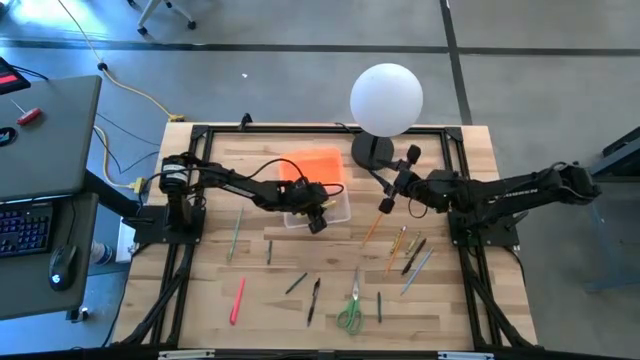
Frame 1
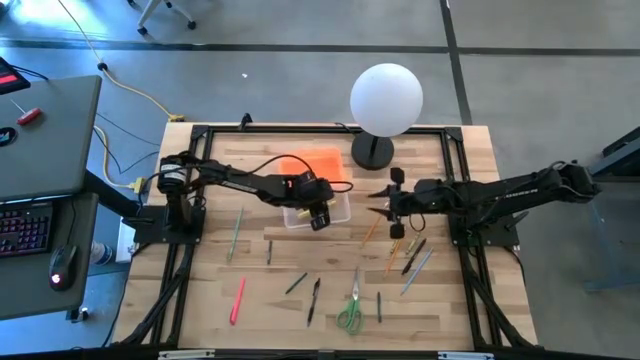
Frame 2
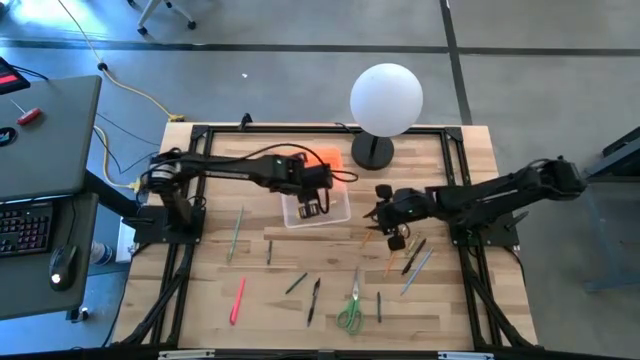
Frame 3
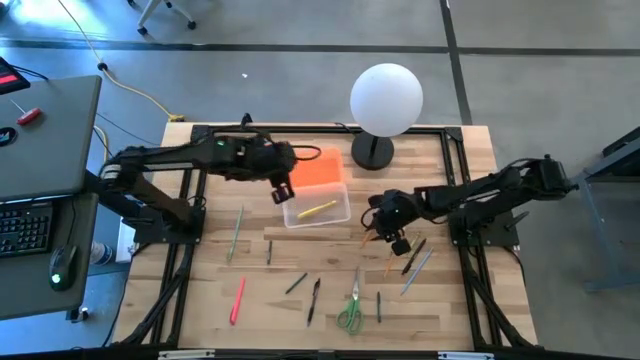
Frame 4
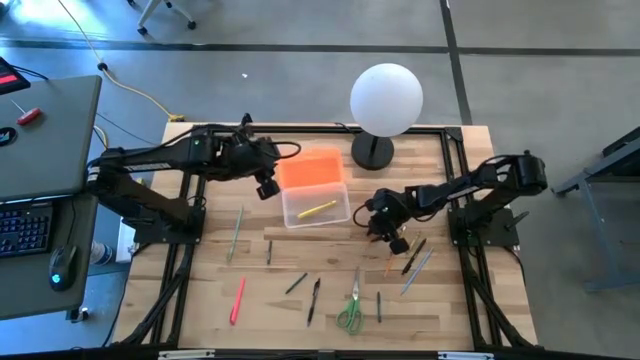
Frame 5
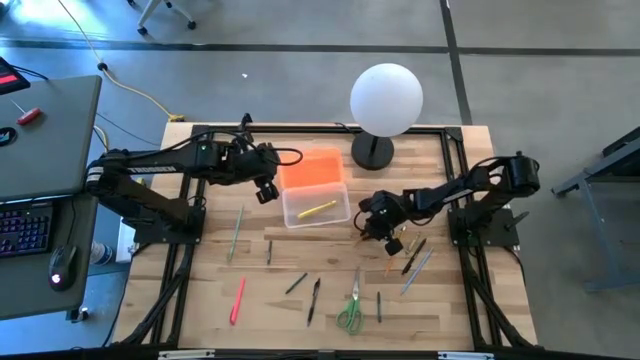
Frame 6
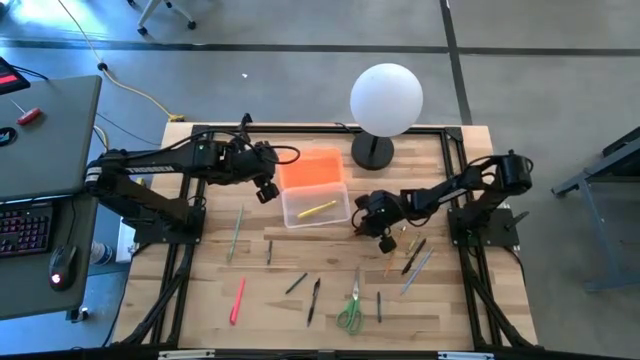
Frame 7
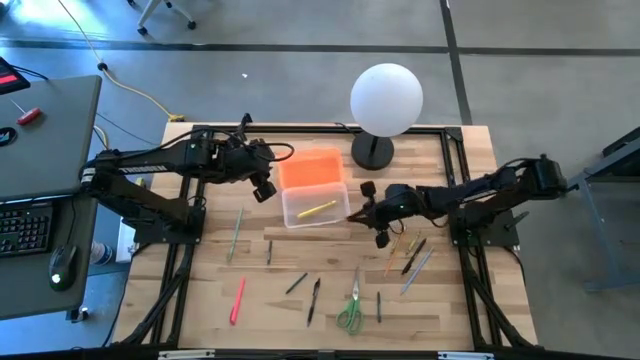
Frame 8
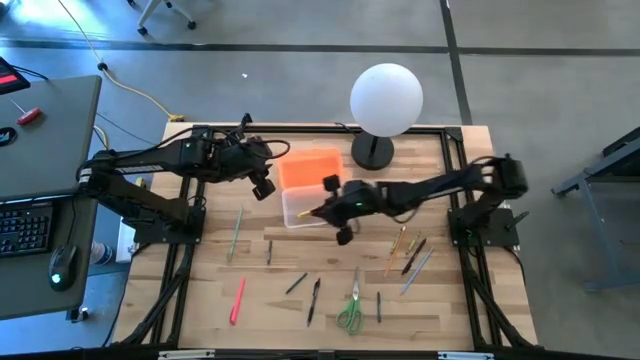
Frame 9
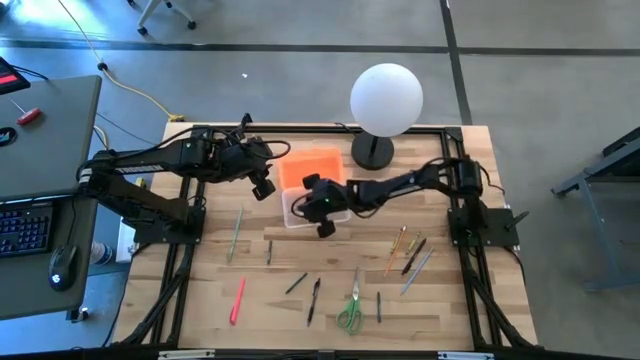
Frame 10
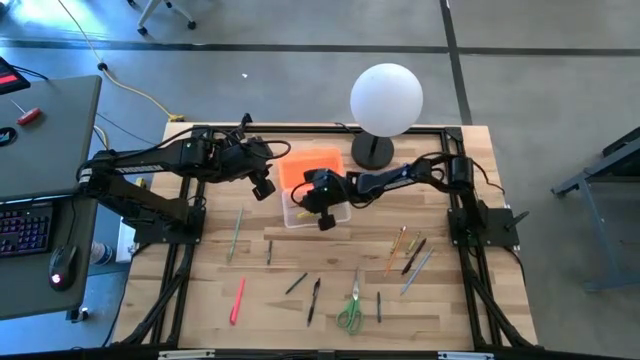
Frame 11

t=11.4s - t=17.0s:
Task: Pick & place school supplies into a supply box
Put the top orange pencil into the transparent supply box

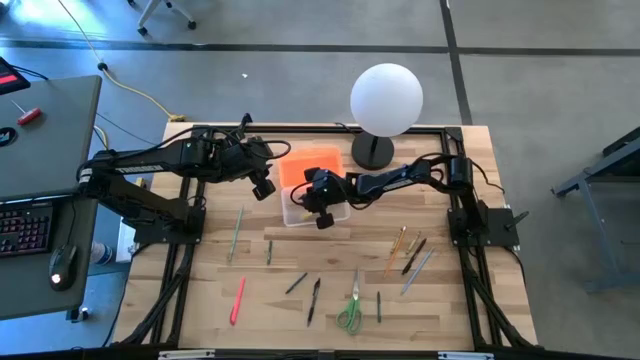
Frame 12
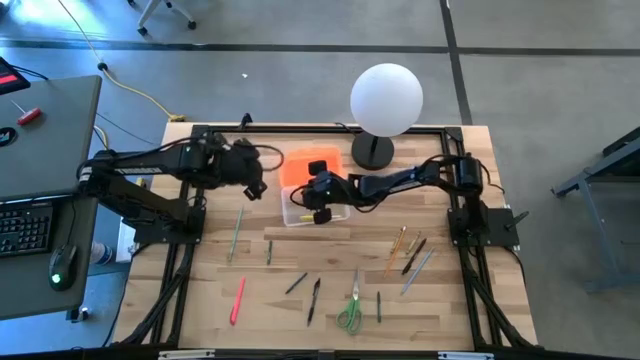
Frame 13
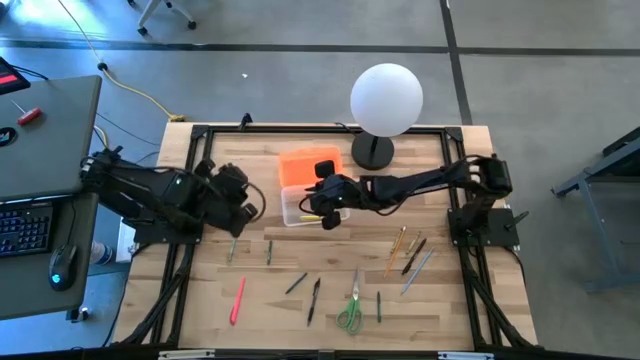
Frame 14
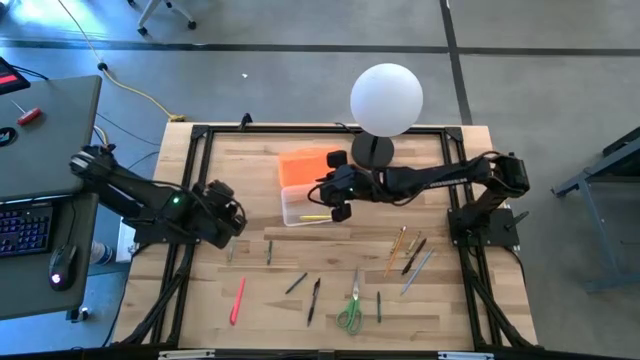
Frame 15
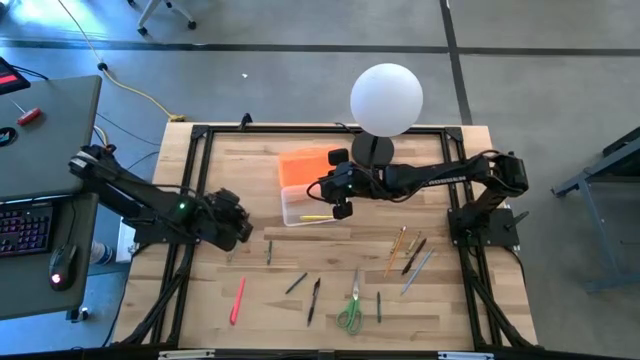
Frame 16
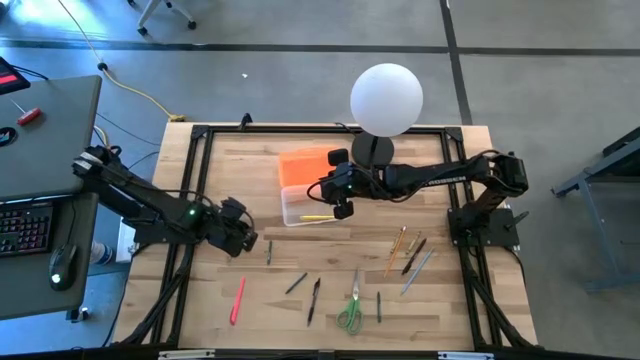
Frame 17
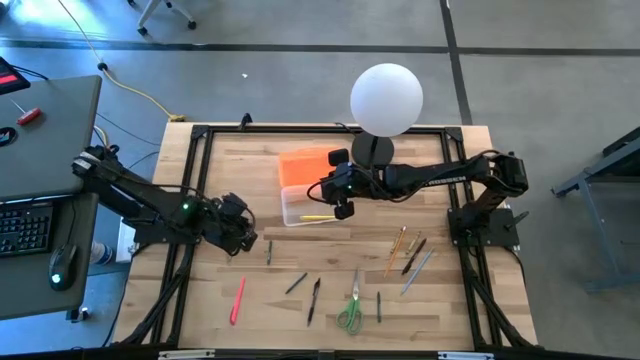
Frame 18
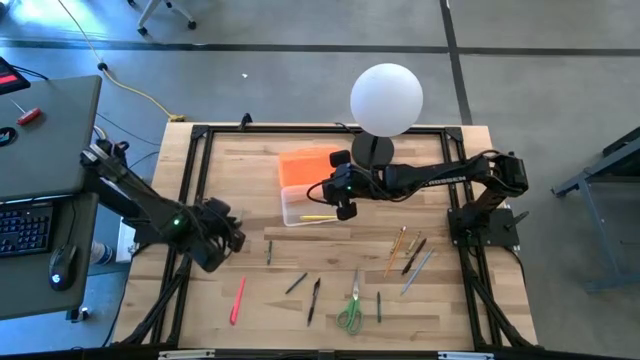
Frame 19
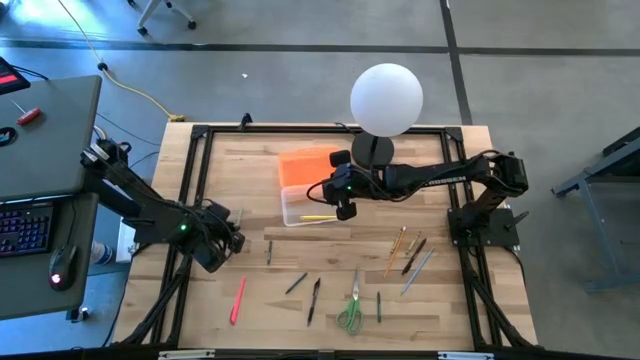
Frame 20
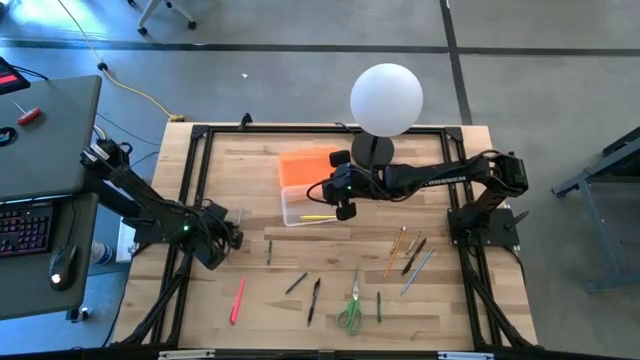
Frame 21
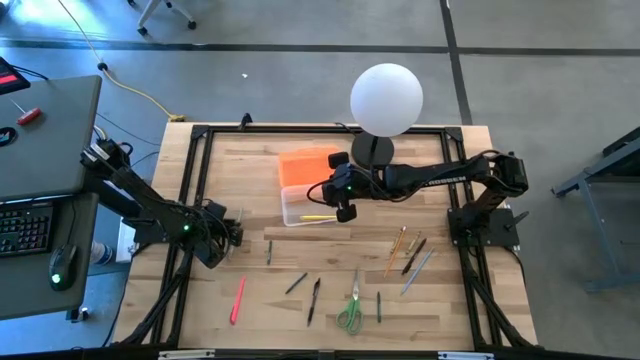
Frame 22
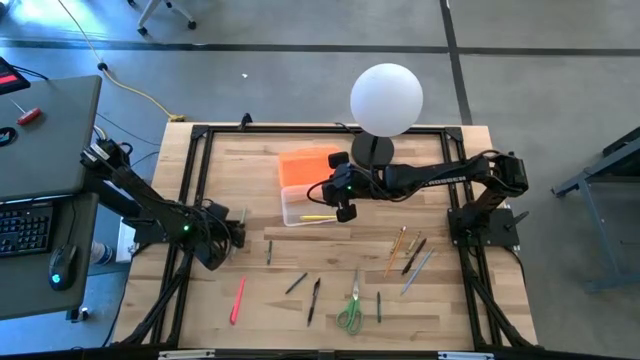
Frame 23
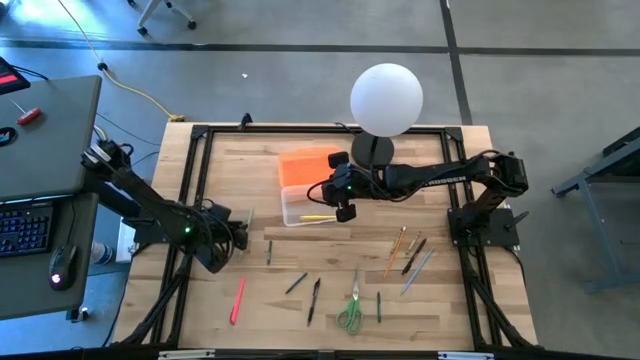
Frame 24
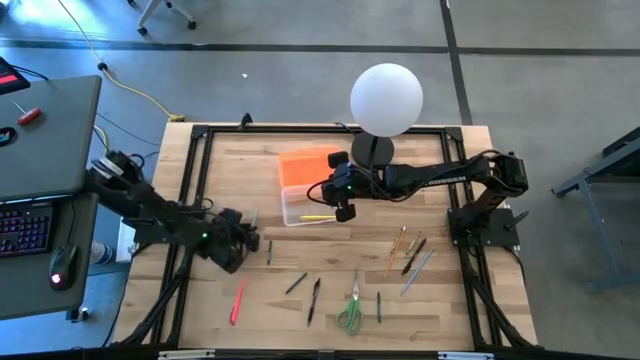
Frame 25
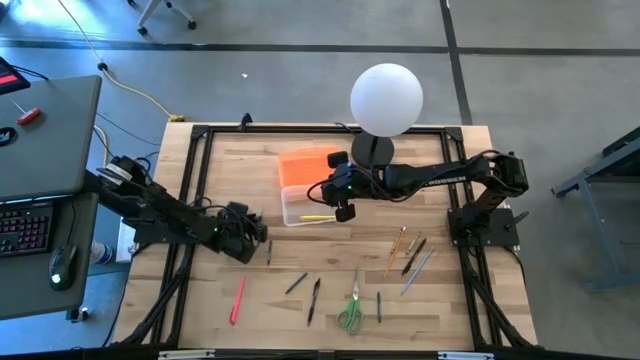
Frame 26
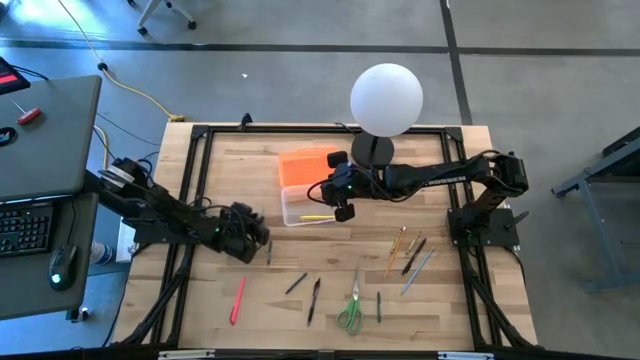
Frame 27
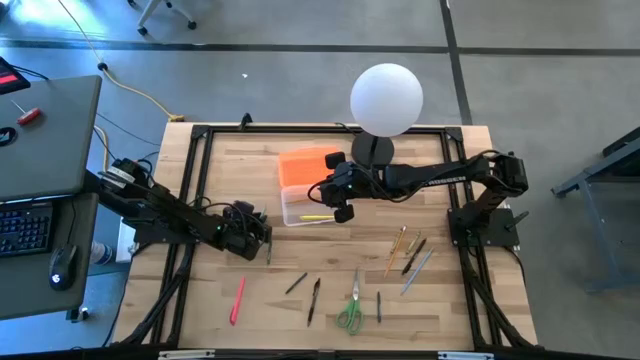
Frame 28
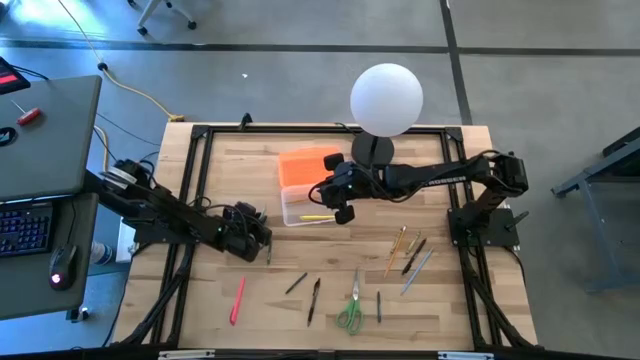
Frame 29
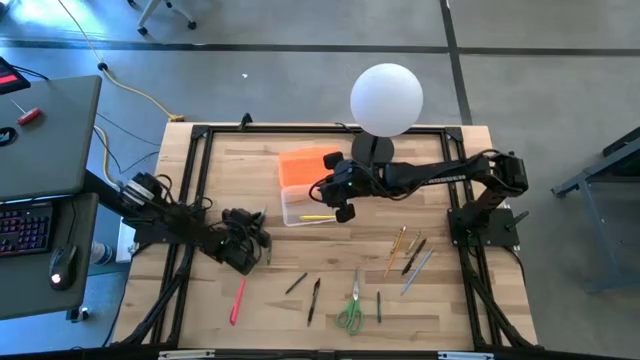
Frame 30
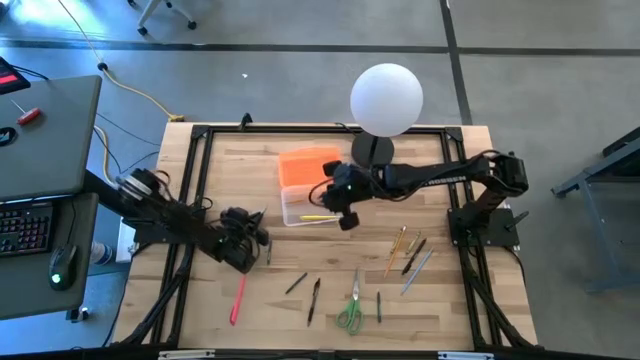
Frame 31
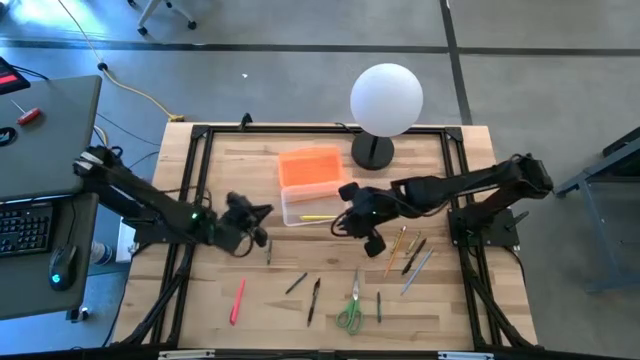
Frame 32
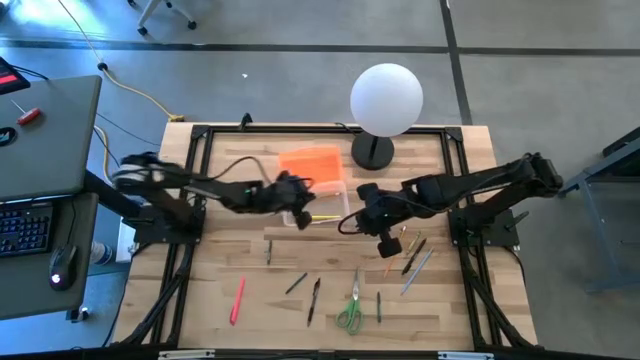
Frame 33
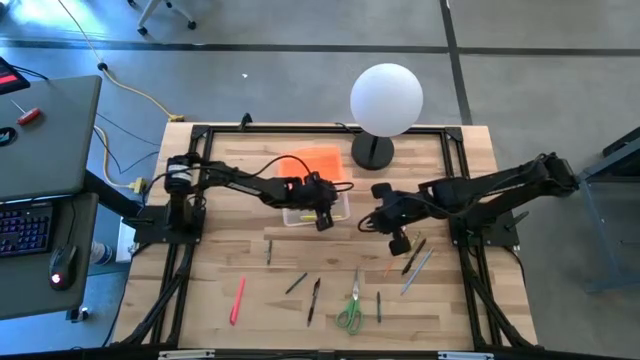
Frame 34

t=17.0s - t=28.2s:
Put the light blue pencil into the transparent supply box

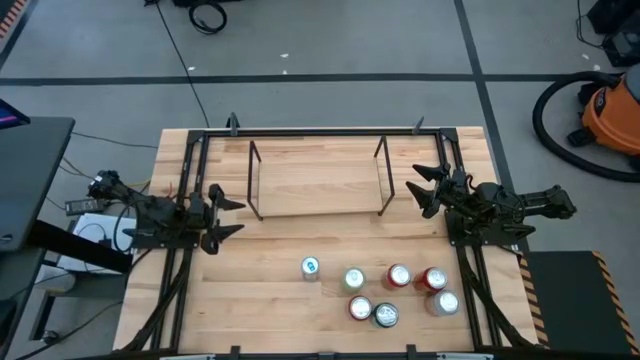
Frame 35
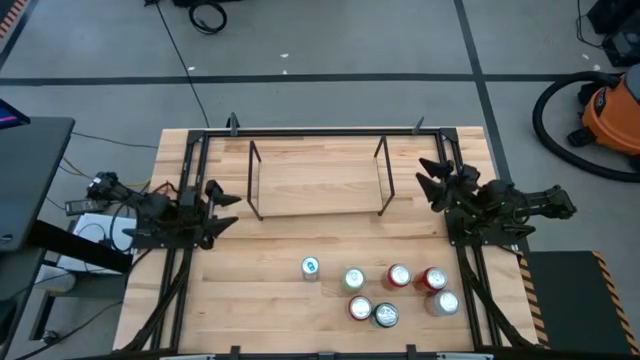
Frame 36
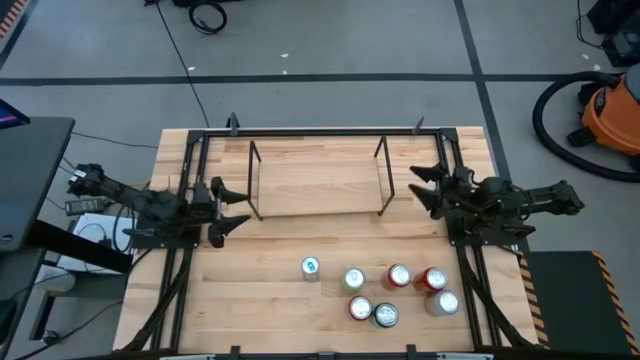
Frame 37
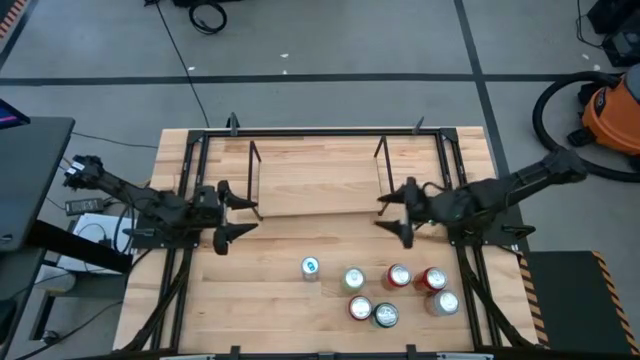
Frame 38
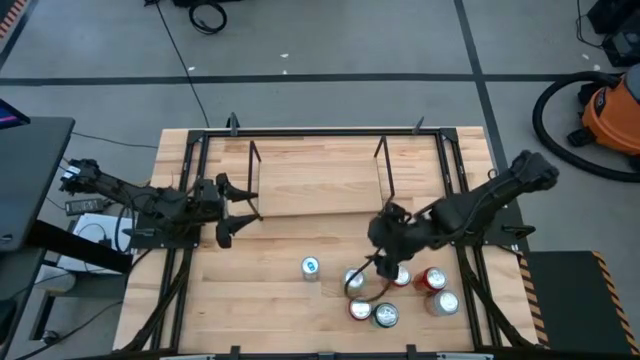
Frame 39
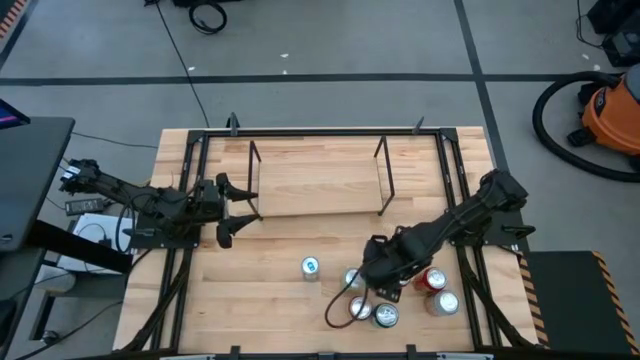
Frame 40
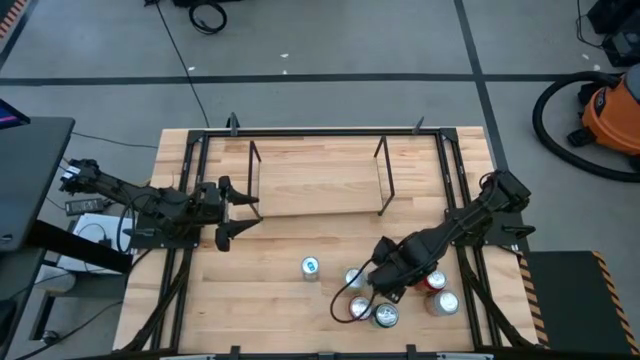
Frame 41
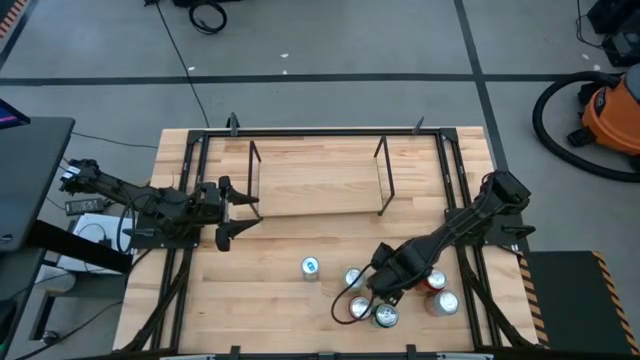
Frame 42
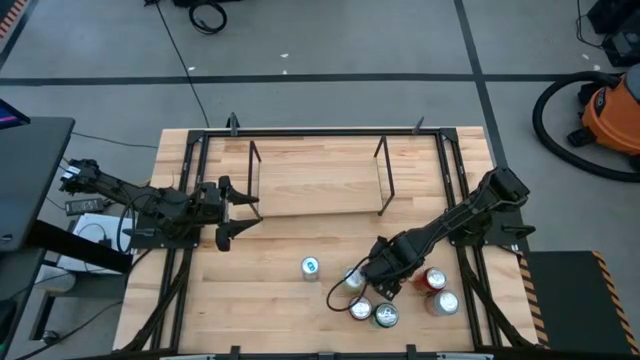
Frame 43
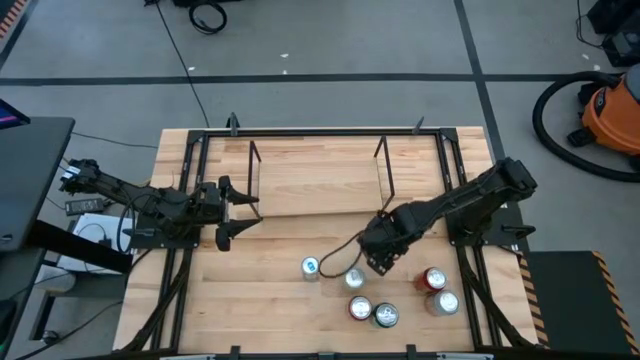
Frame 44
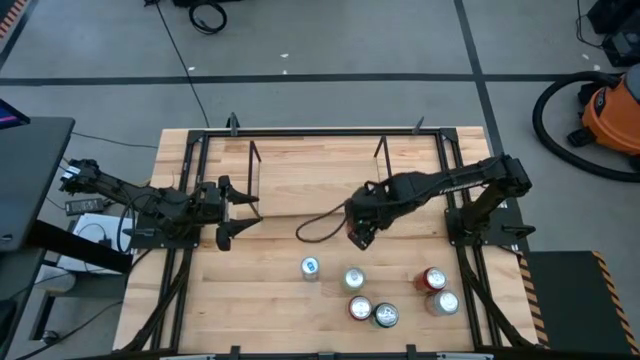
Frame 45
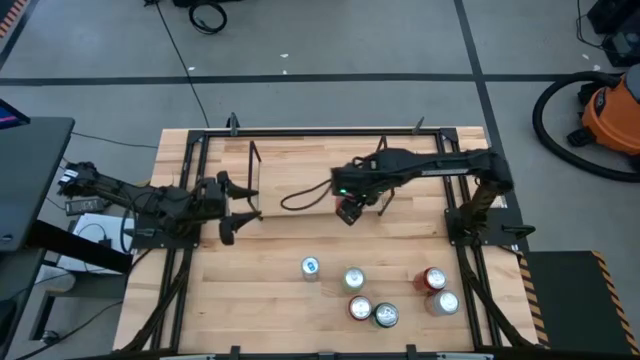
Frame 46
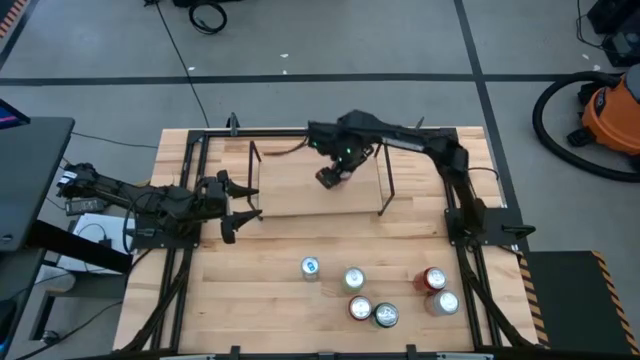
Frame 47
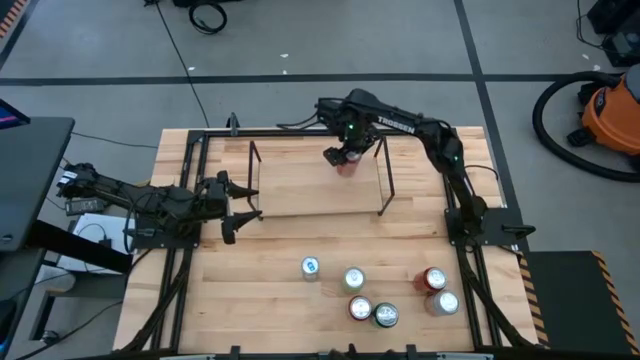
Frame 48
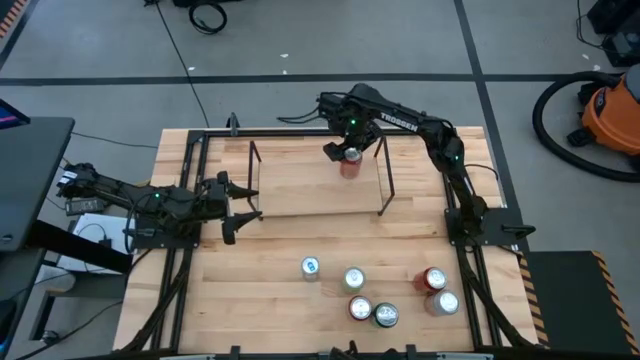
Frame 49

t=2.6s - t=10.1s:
Task: Place canned beverage on shelf
Put the orange soda can on the shelf
